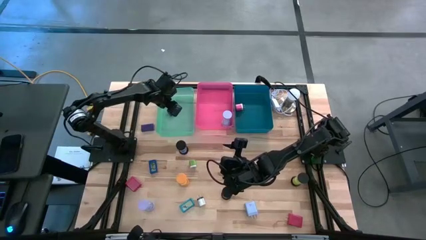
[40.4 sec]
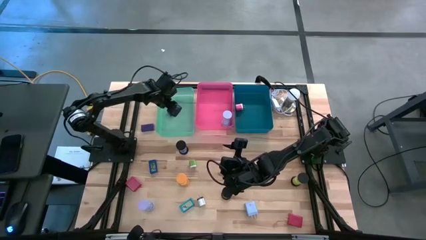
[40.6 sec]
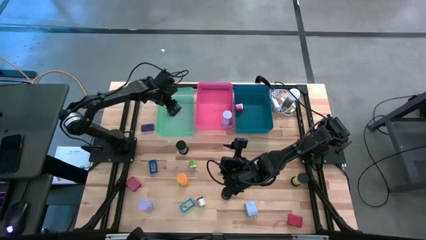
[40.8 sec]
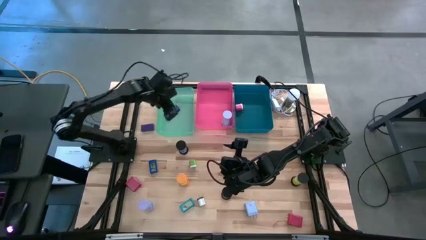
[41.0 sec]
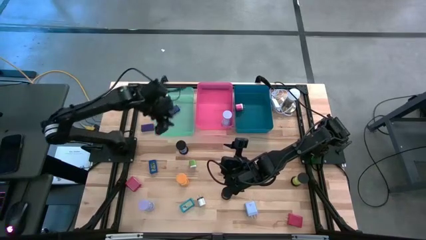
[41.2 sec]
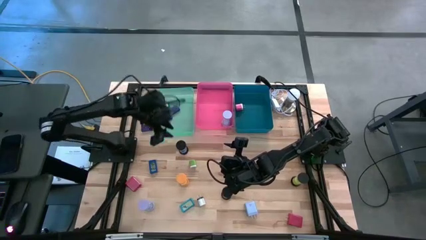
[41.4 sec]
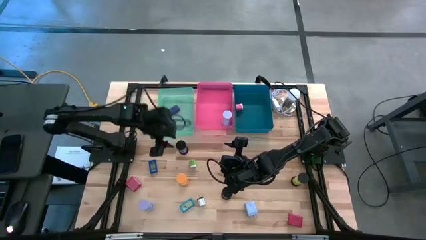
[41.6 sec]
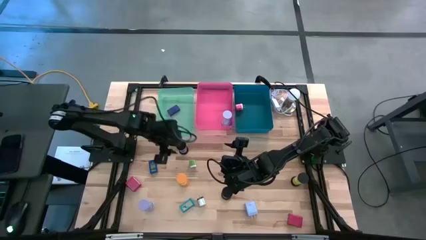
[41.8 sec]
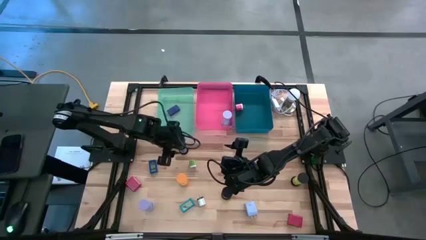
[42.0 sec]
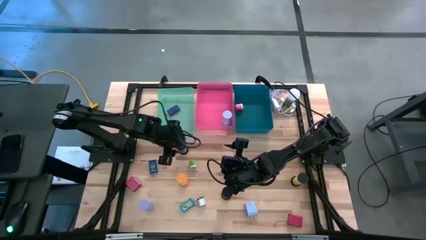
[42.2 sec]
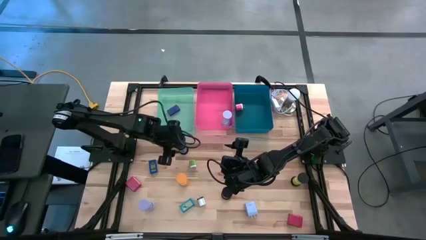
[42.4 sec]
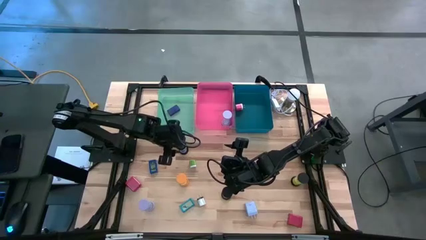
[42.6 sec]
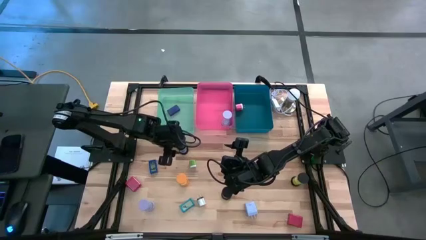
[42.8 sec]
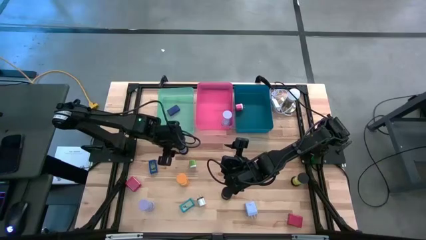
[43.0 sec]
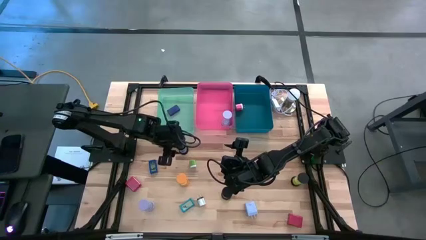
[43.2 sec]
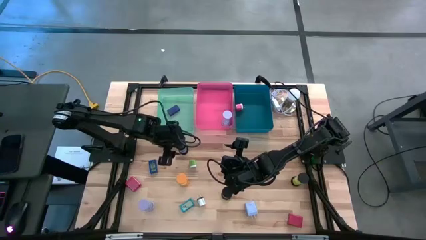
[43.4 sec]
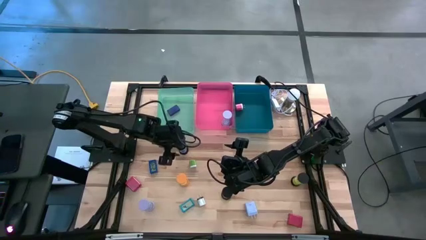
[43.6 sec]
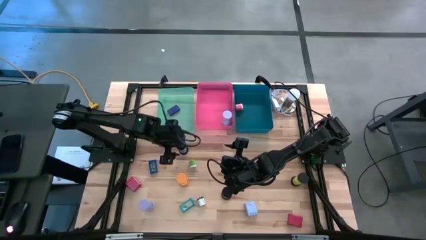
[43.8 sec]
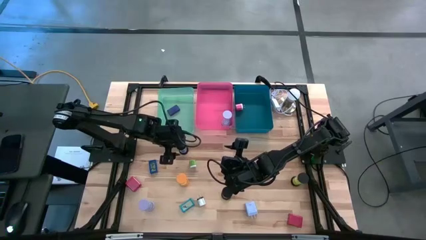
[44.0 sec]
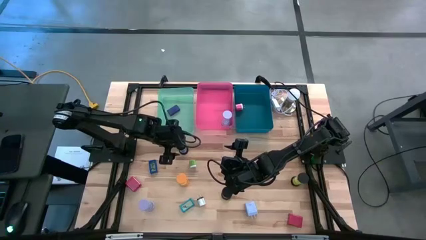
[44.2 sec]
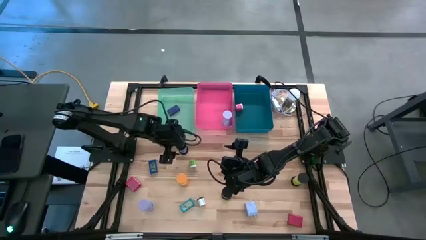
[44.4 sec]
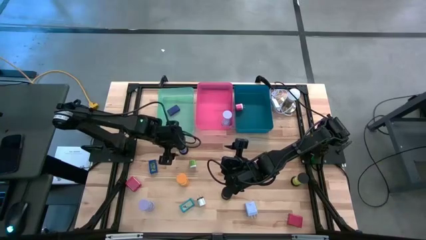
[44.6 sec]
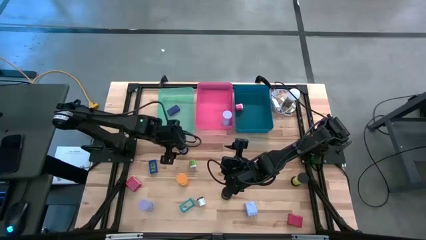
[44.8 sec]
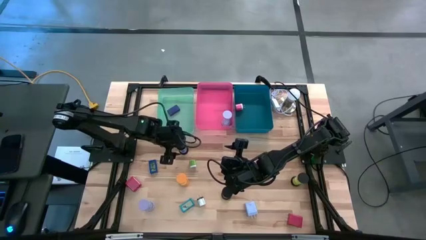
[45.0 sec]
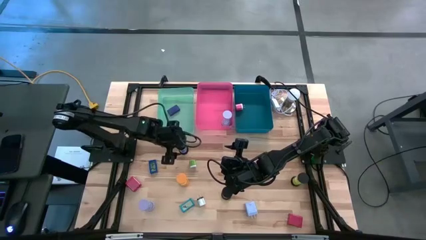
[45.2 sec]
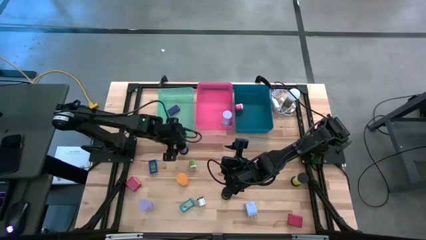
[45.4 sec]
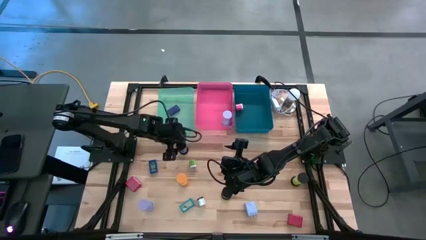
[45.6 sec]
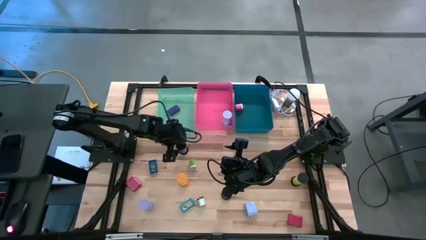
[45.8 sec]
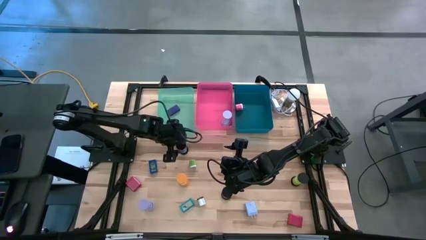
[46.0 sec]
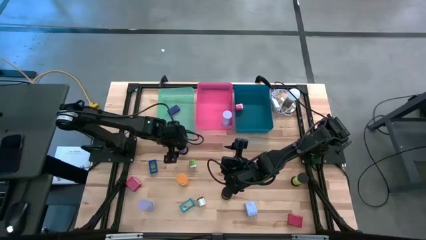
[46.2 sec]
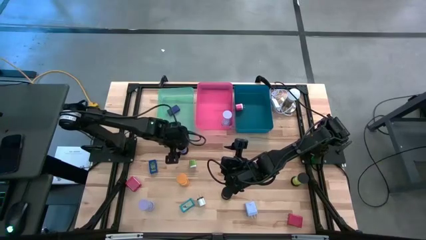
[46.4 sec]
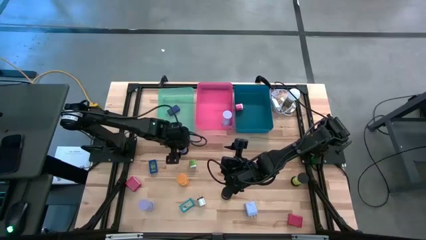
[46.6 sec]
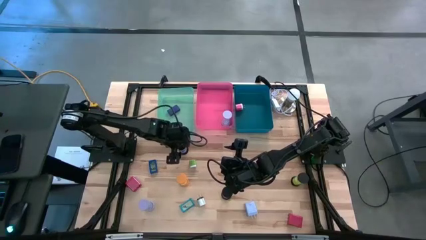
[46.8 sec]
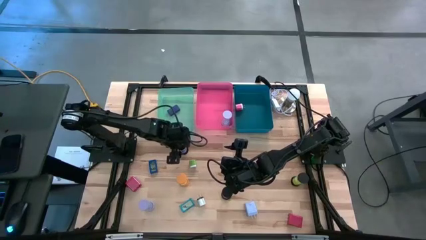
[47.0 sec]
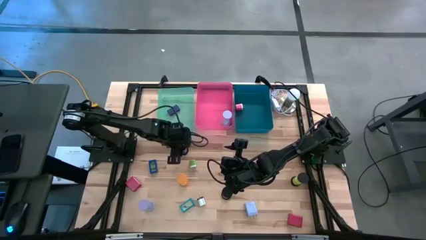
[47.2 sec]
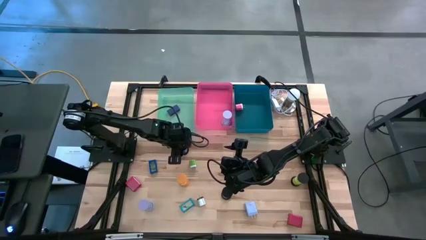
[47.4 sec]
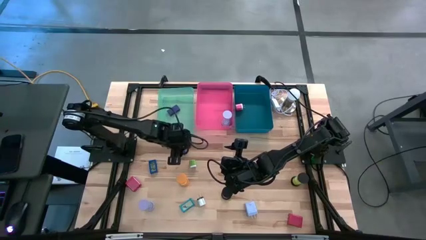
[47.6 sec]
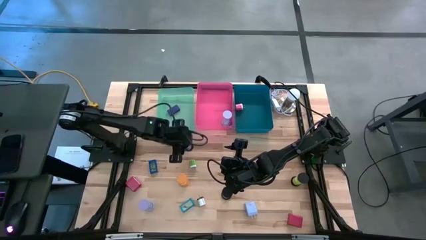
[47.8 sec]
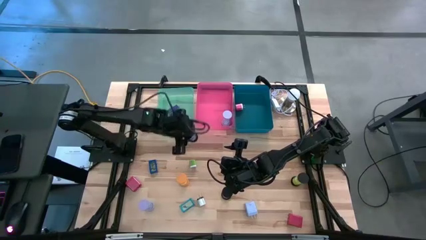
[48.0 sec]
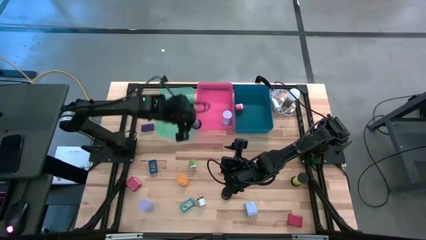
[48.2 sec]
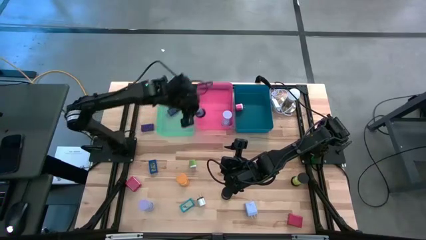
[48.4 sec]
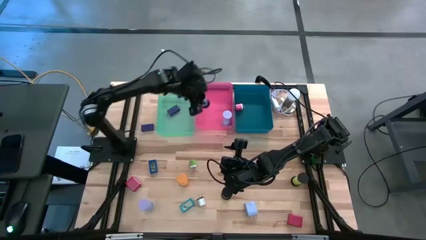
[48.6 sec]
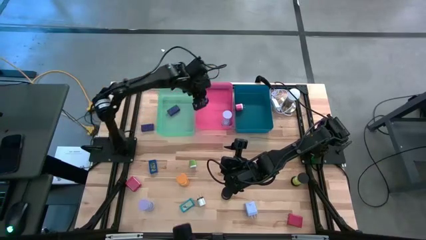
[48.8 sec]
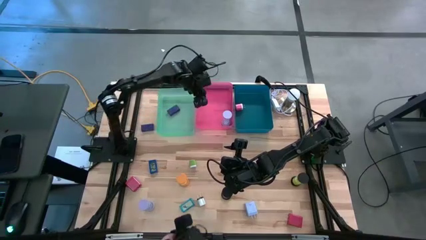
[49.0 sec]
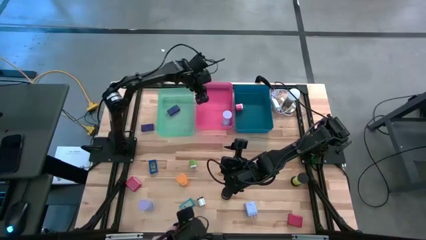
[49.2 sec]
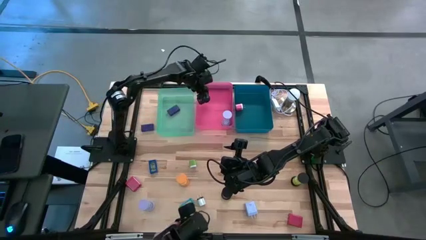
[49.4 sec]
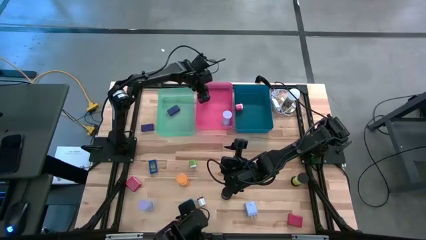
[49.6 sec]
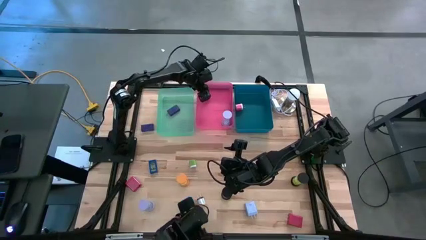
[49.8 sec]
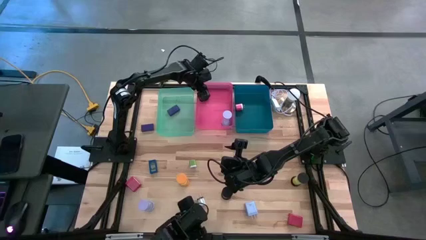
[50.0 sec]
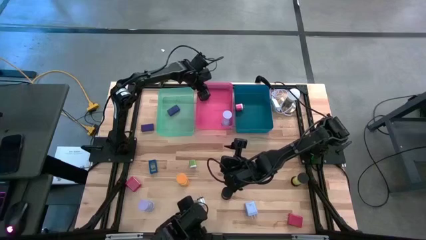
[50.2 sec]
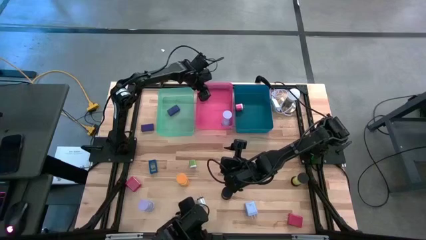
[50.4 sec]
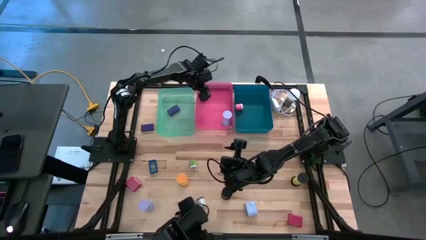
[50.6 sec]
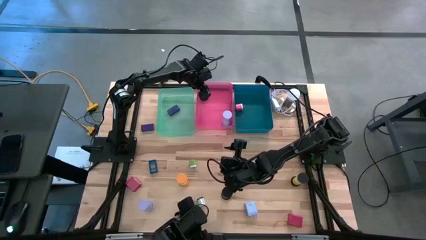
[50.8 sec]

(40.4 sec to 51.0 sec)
Task: Pick & Place Office items
Put the blue hourglass into the pink bin

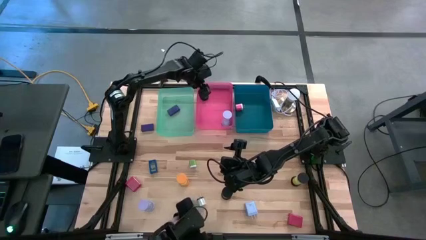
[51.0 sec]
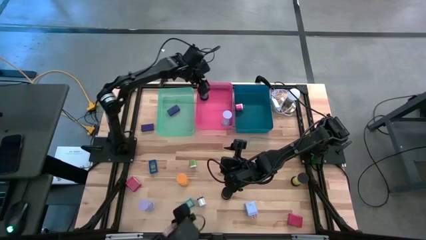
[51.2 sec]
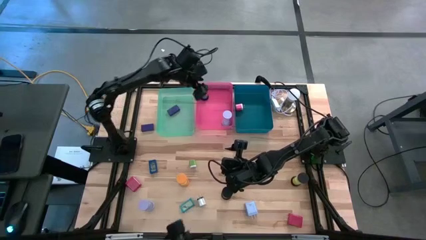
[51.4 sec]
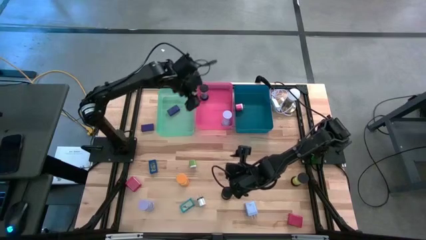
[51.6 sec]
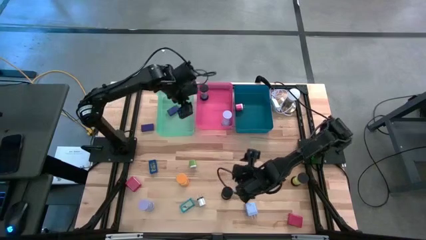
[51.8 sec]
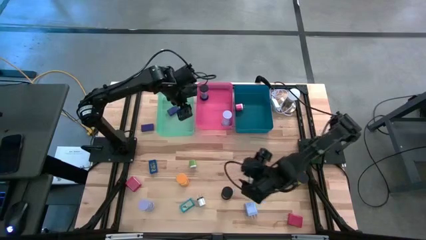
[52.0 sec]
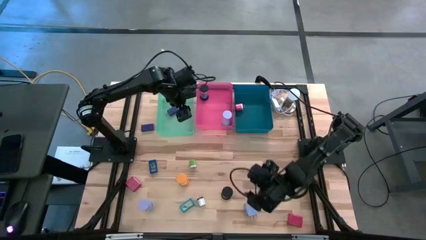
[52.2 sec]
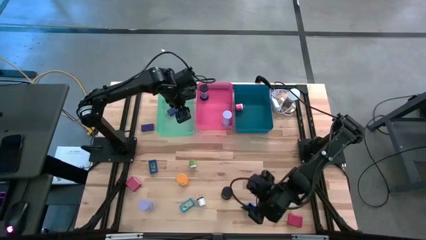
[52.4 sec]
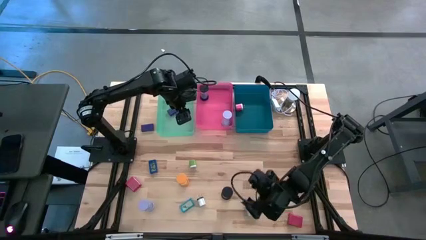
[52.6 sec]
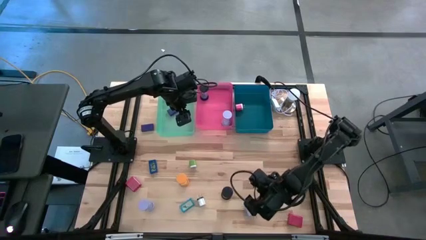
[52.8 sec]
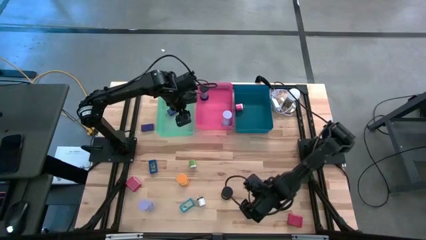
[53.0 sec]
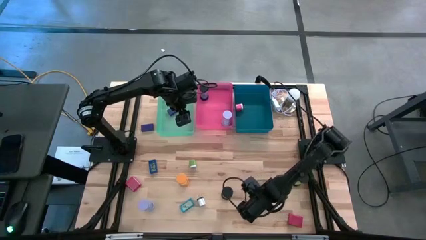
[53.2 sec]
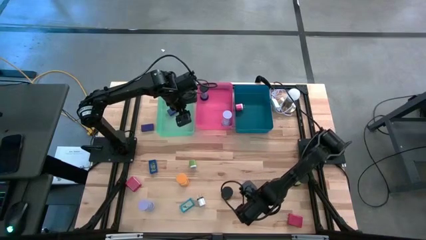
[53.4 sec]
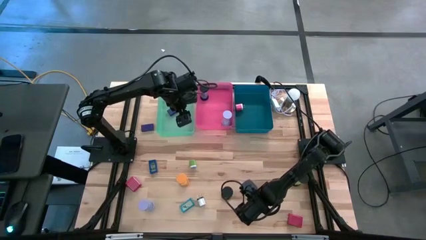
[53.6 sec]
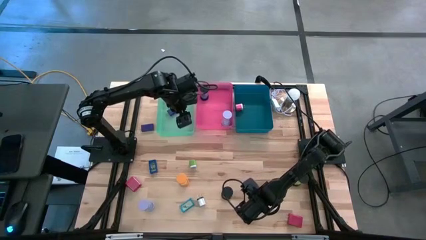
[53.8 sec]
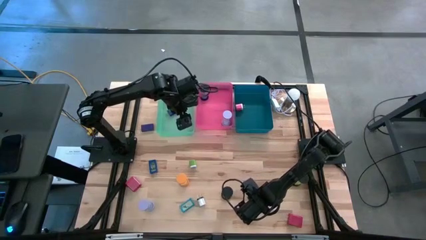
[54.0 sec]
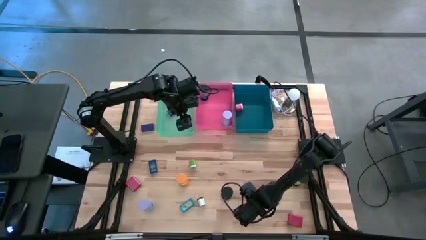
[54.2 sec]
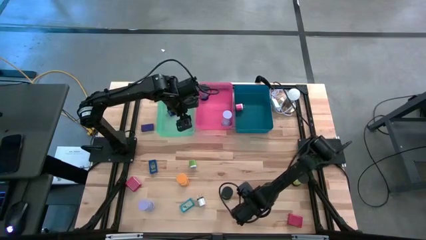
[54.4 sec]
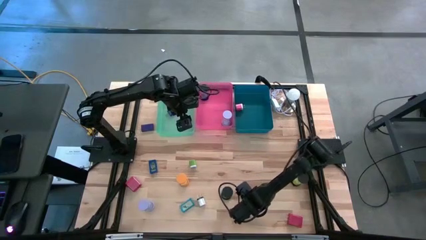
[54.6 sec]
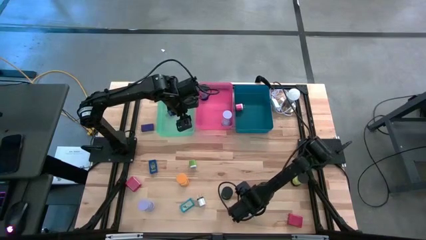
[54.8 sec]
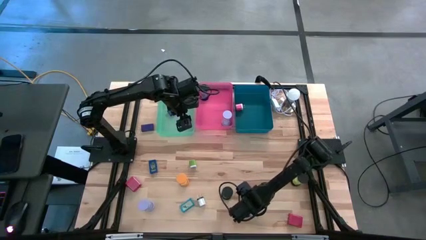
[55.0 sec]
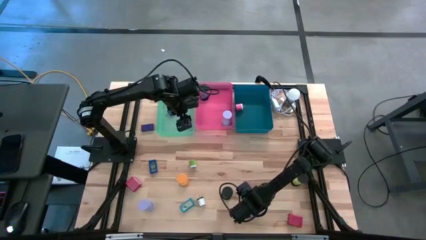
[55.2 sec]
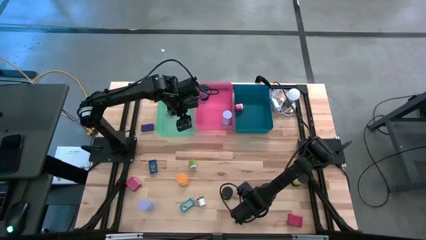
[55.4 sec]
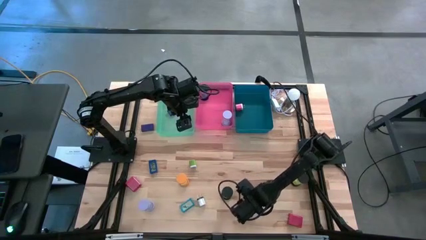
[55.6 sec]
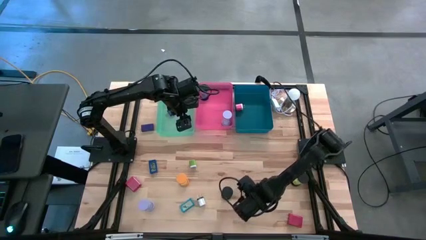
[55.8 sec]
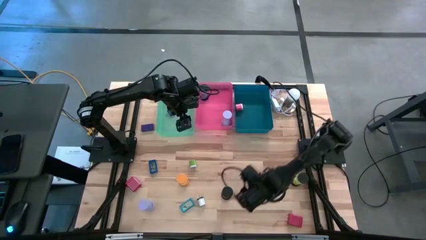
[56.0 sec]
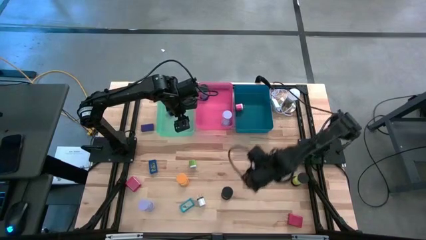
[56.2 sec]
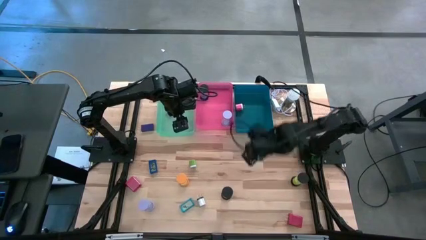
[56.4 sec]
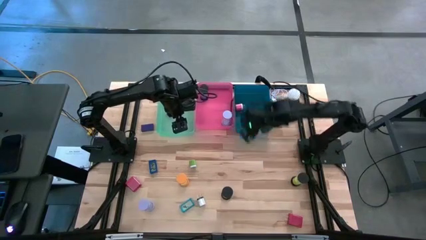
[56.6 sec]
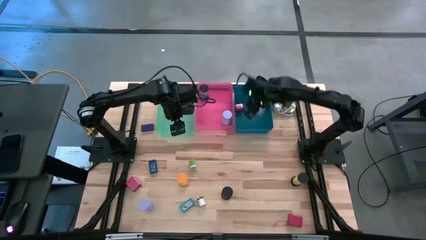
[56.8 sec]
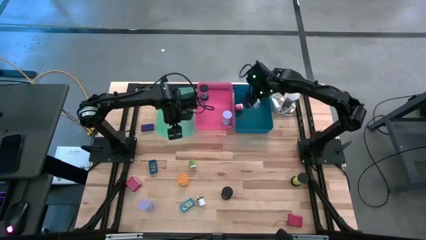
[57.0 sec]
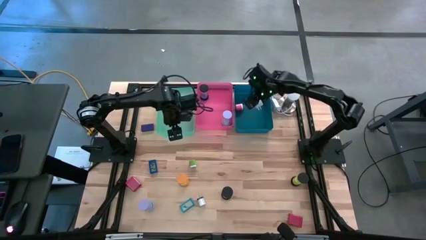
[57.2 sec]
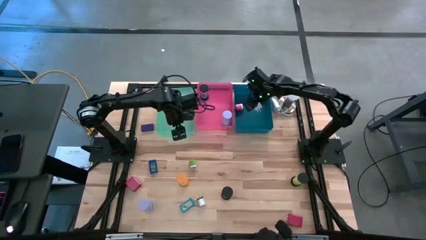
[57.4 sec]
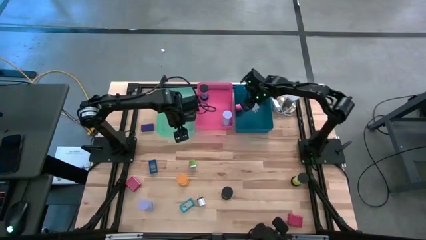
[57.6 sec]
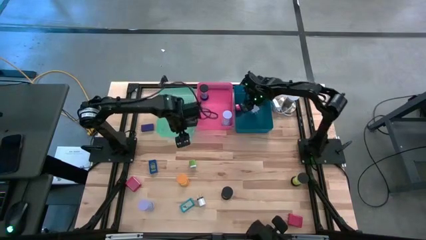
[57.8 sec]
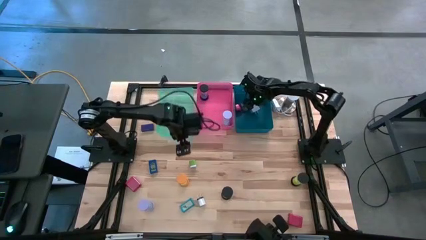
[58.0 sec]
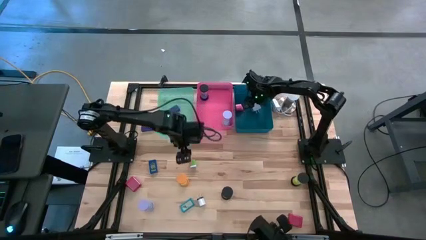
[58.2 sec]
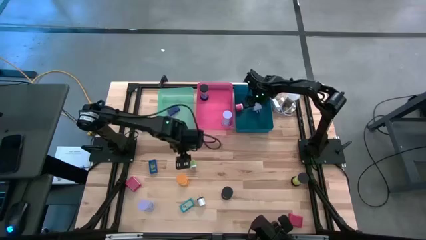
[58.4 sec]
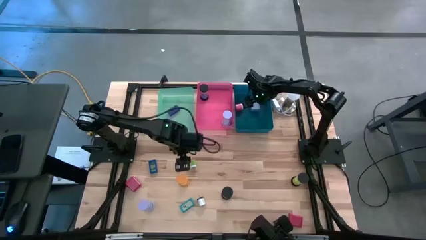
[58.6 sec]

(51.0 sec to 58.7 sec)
Put the violet charger adapter into the blue bin
